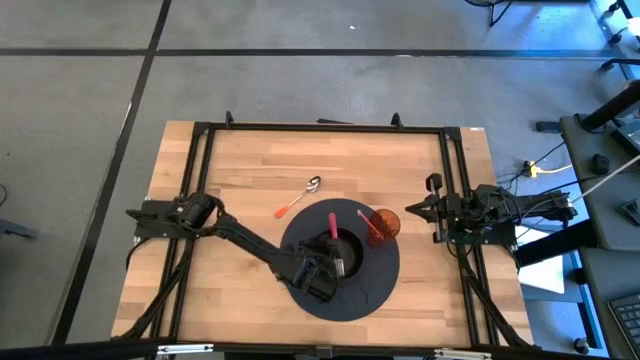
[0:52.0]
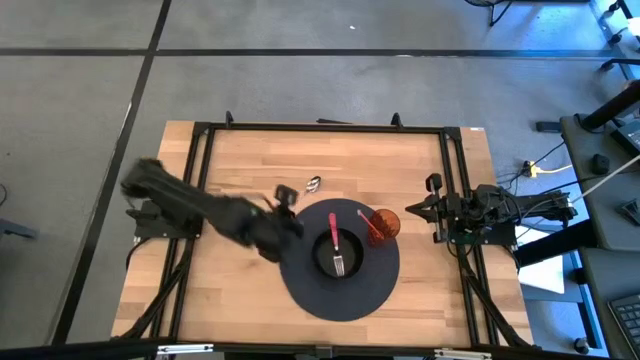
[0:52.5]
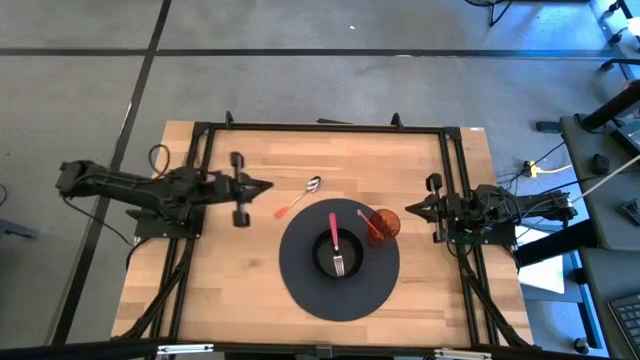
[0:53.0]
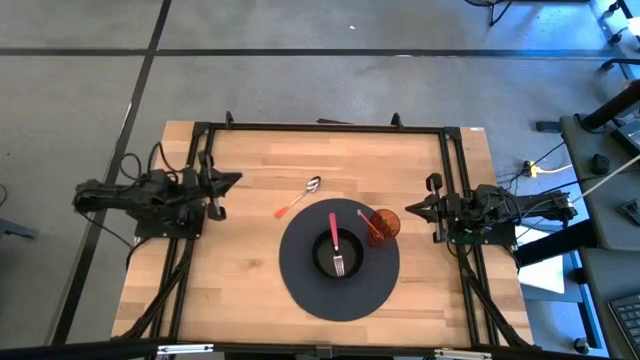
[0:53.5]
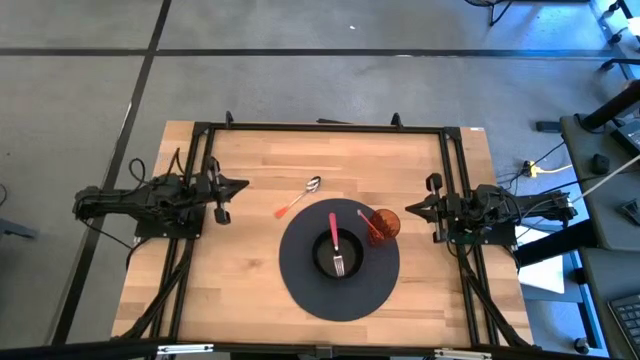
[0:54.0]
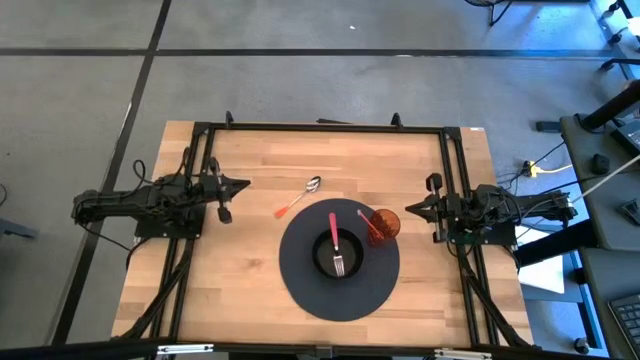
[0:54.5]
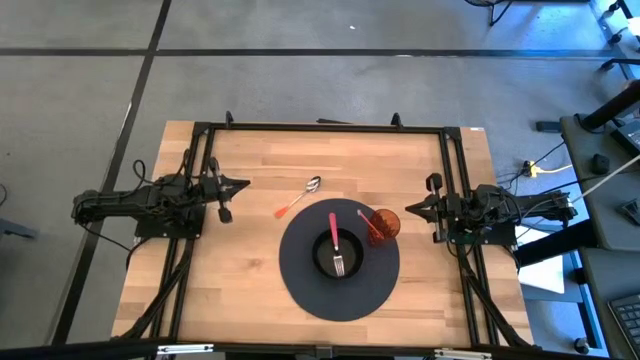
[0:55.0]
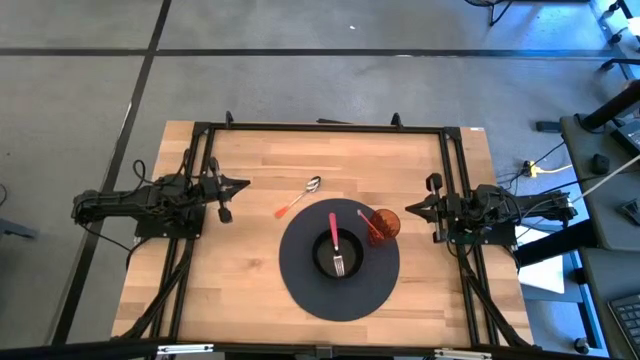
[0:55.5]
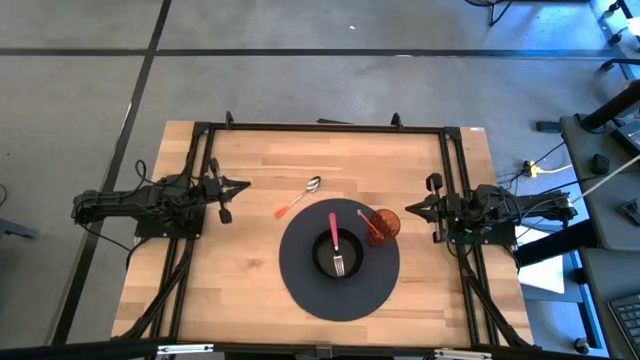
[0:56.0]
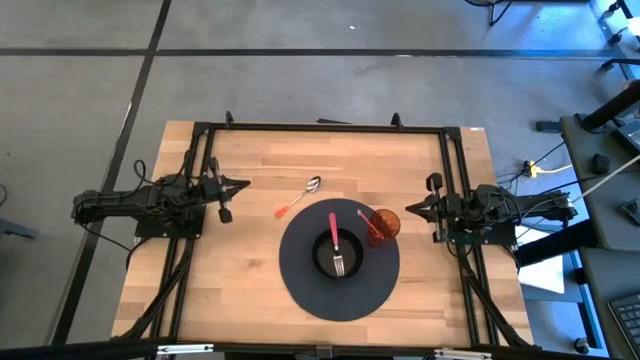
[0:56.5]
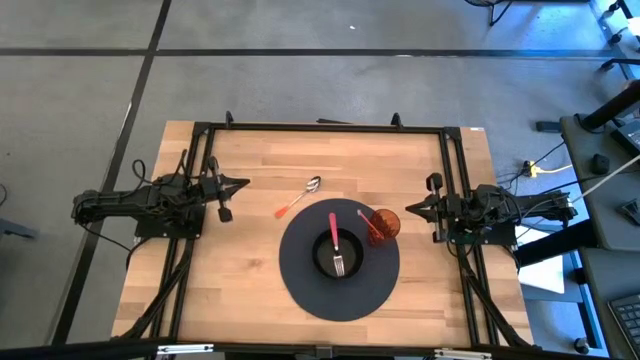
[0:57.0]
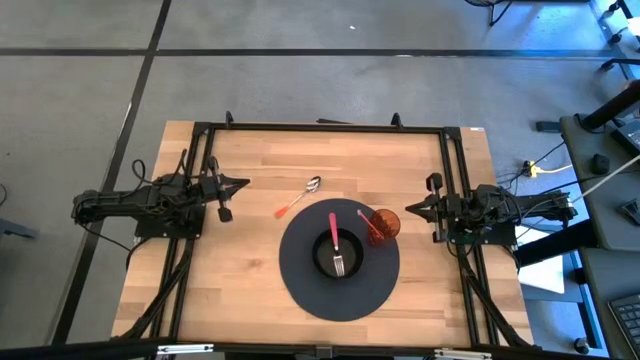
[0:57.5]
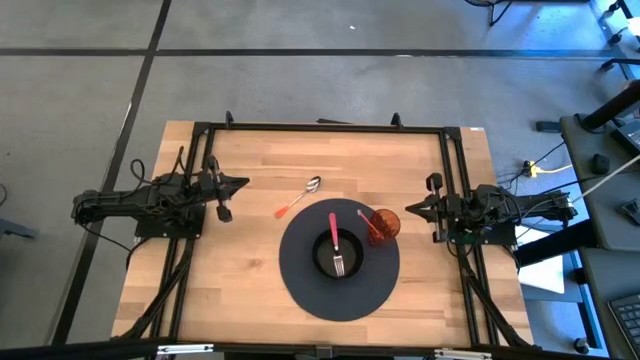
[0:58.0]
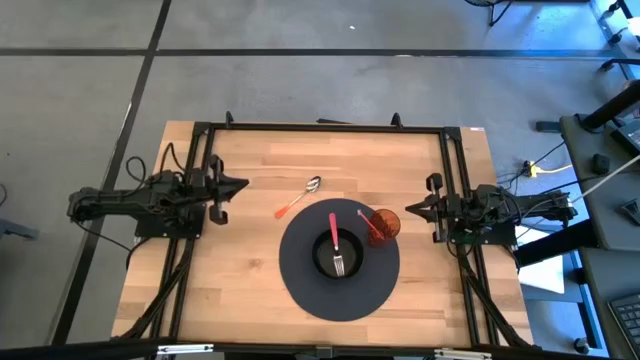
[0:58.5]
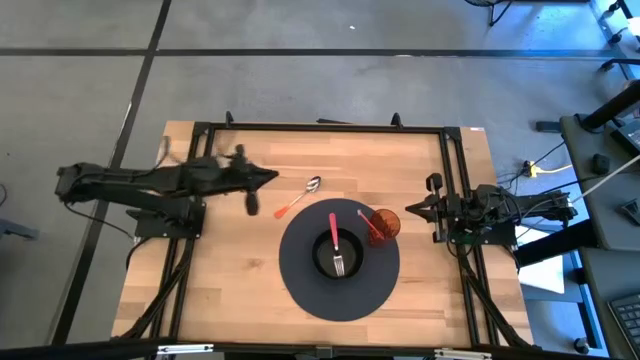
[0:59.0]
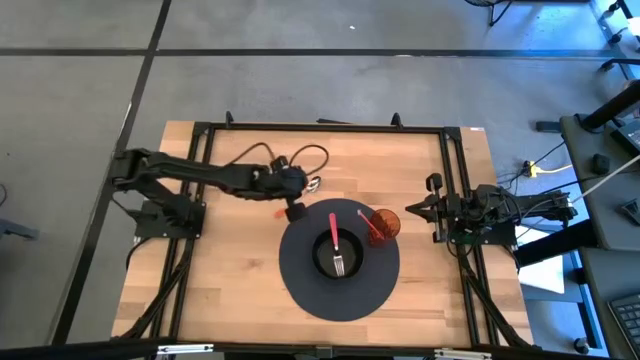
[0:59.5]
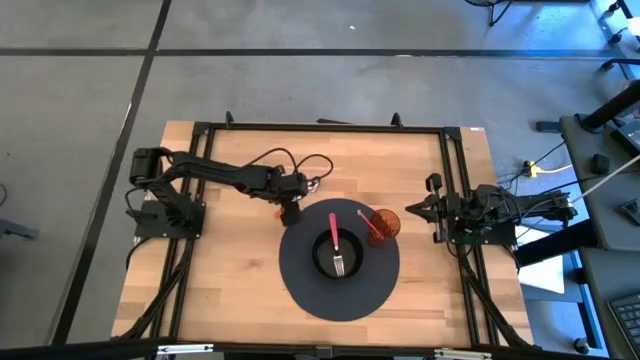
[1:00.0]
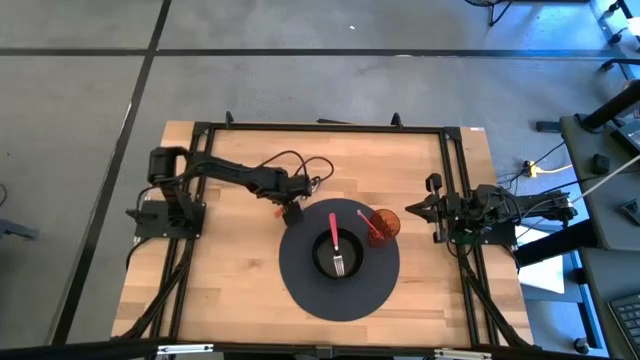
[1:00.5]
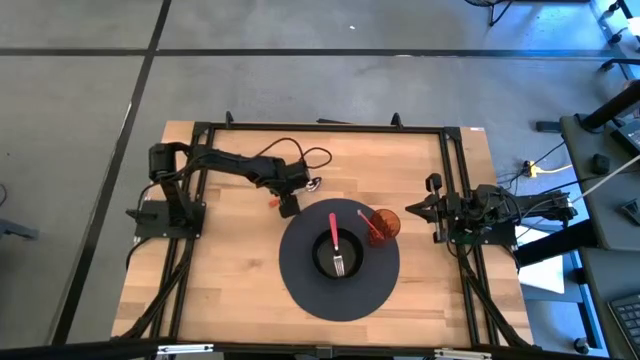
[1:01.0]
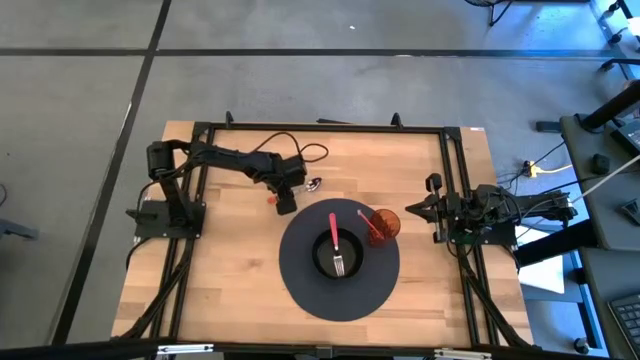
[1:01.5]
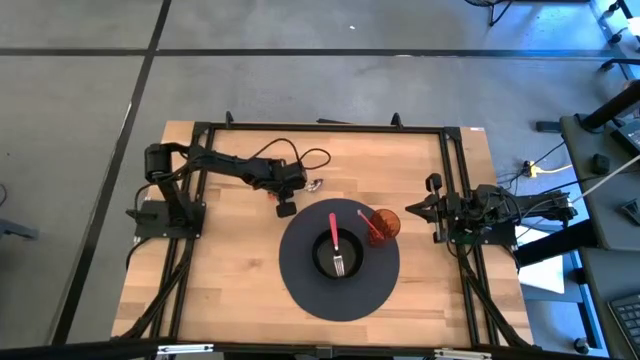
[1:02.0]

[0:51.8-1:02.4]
Task: Pick & Place Utensil
Put the spoon into the bowl

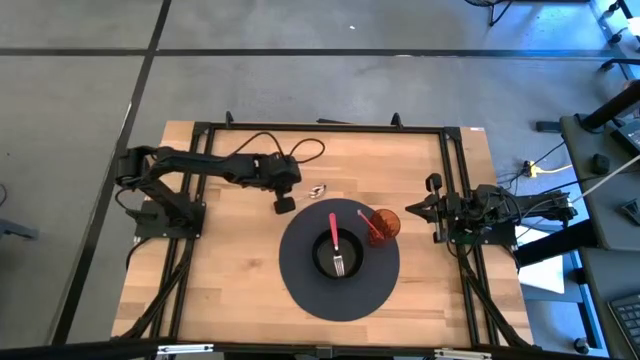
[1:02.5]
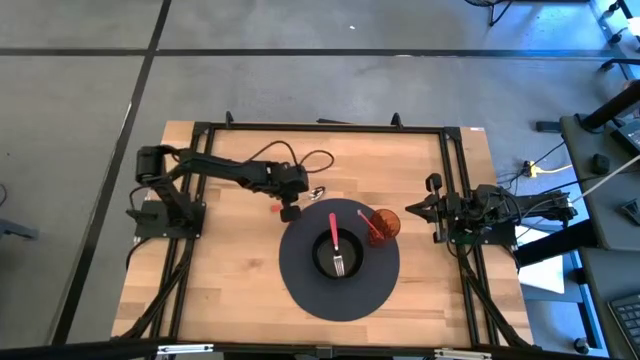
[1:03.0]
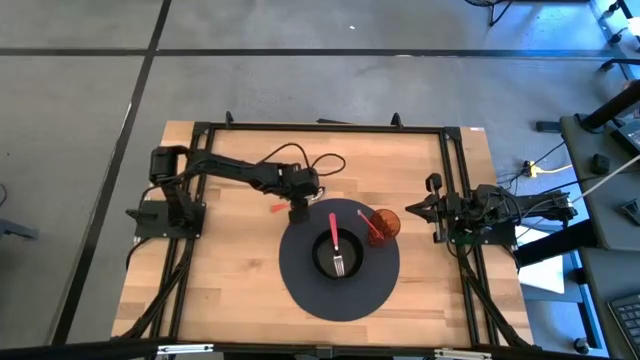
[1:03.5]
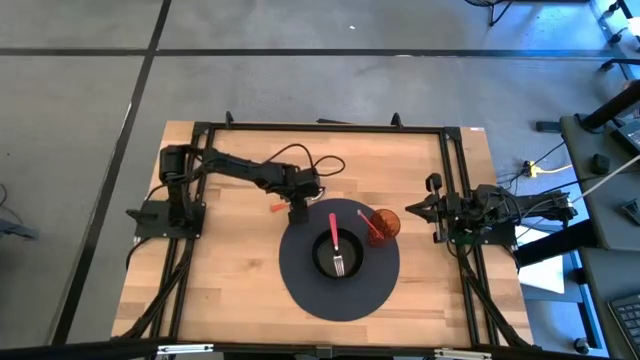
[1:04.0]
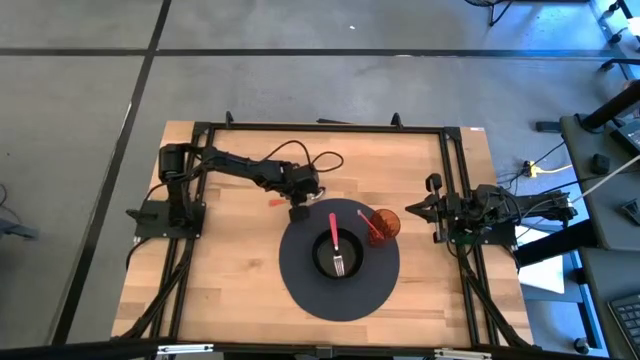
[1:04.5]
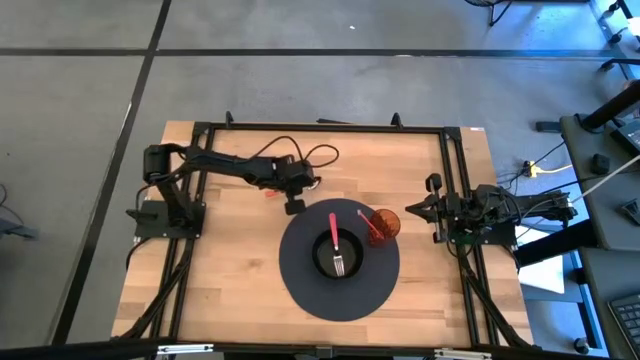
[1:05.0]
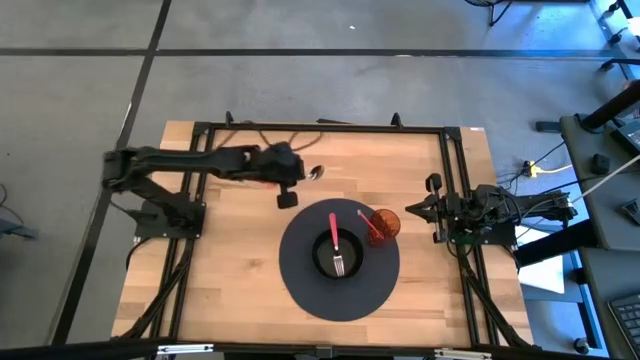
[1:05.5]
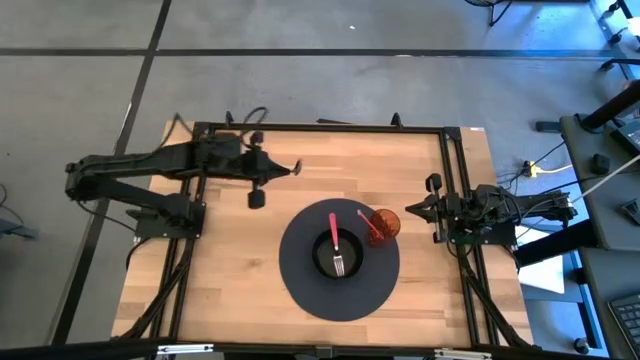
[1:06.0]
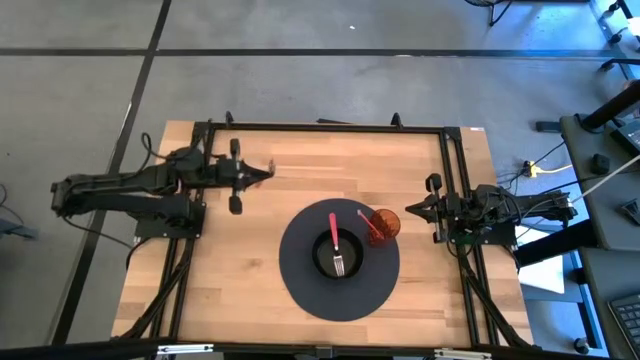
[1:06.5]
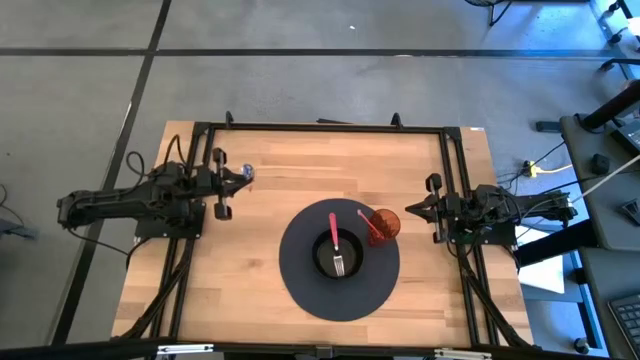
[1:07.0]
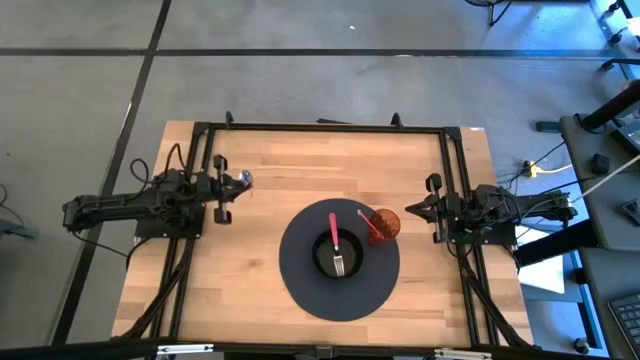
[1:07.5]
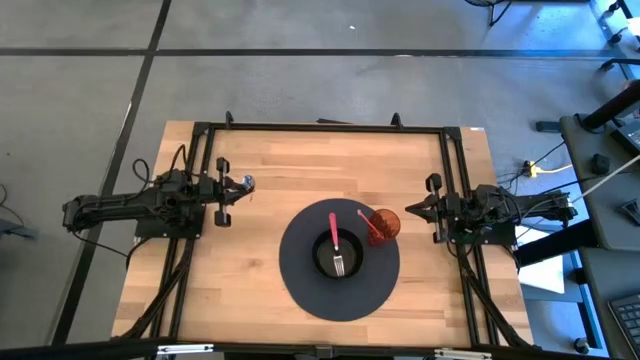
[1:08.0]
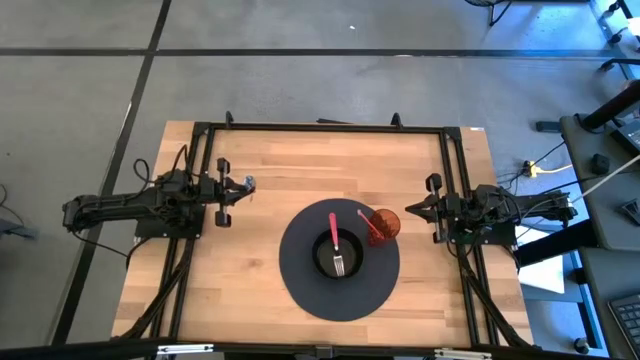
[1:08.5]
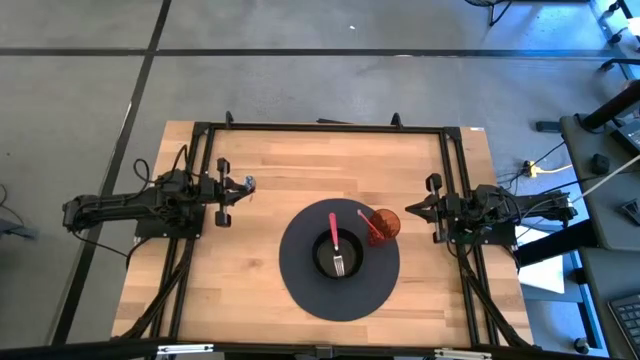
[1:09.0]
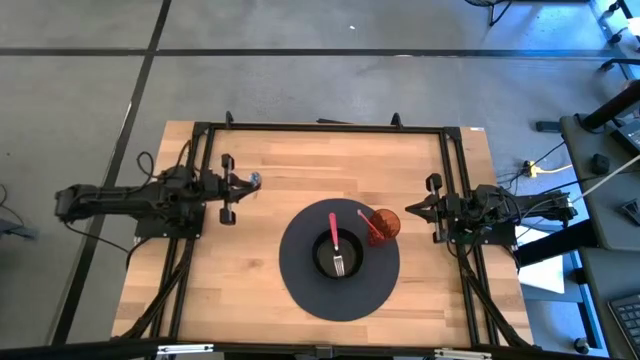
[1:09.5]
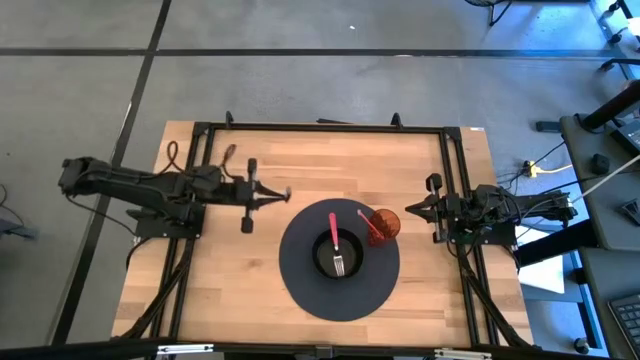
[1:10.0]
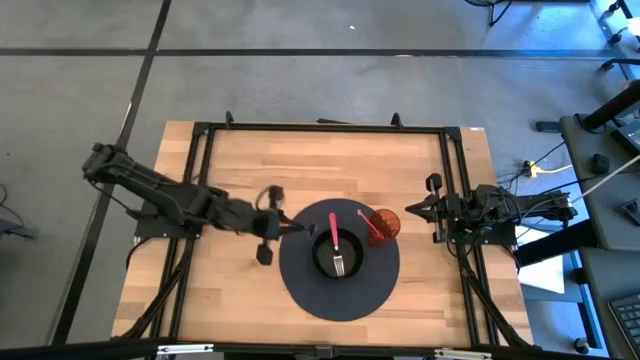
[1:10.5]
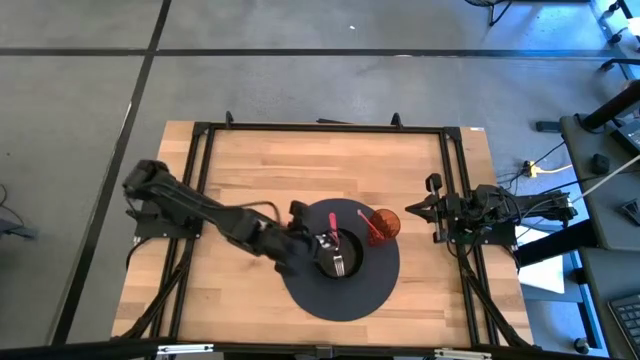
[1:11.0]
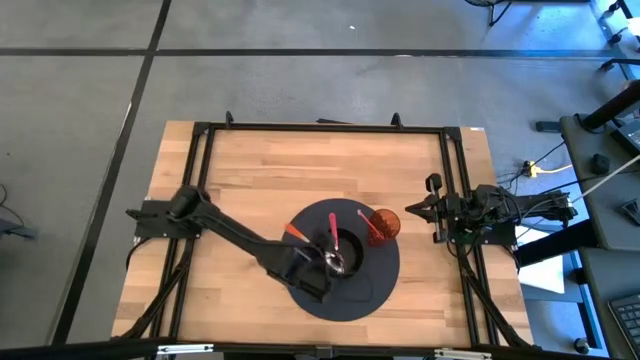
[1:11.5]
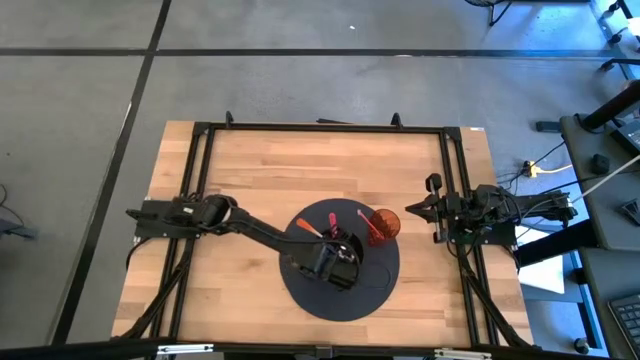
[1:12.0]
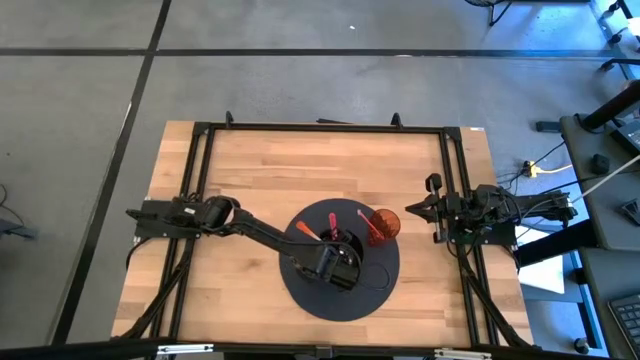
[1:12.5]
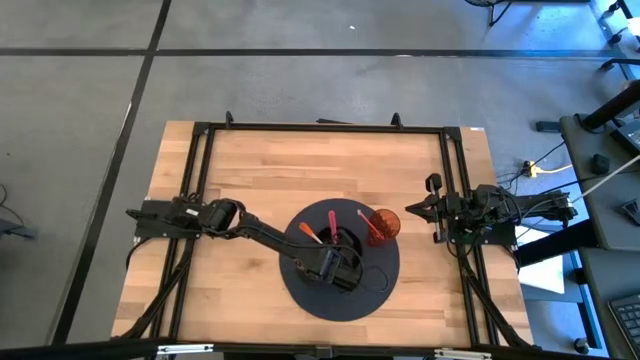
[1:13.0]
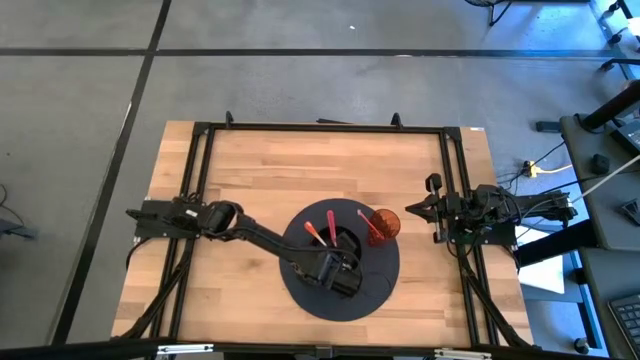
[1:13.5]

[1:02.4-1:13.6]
Put the spoon into the bowl
